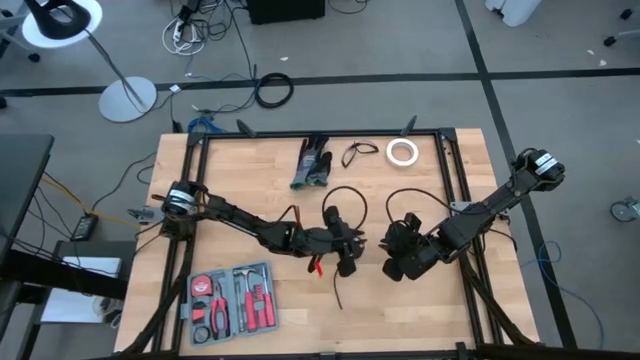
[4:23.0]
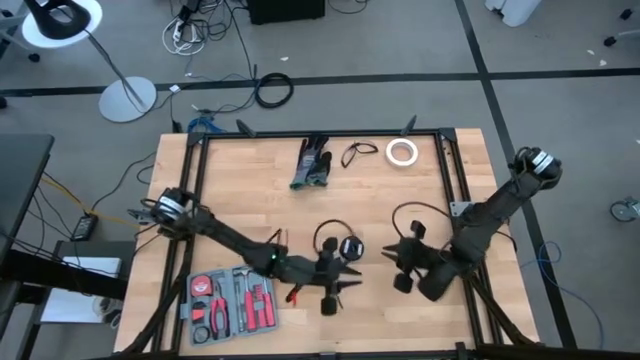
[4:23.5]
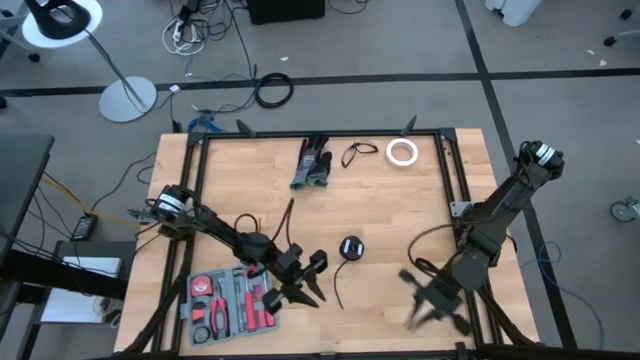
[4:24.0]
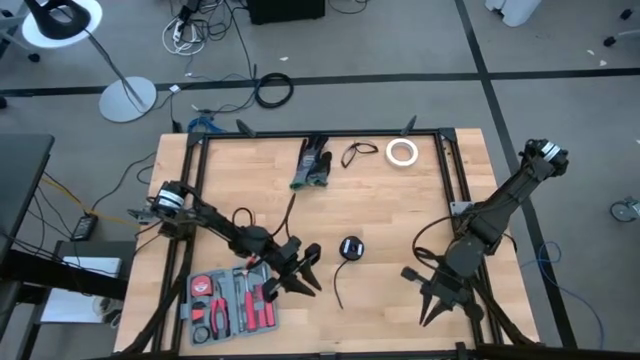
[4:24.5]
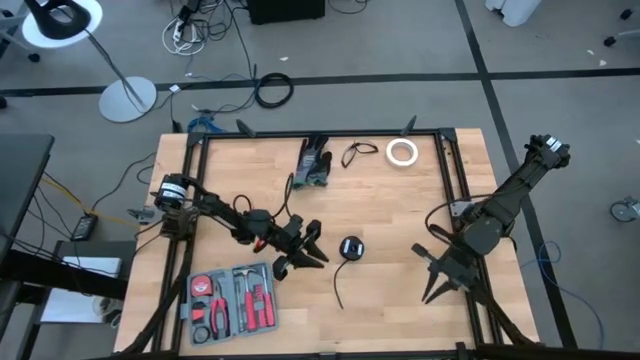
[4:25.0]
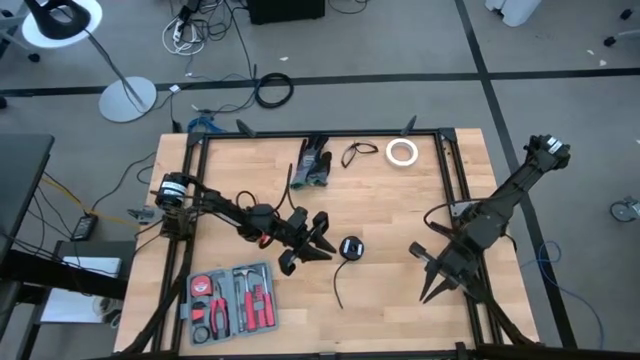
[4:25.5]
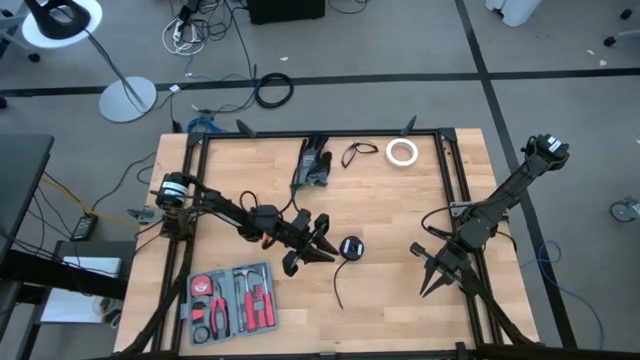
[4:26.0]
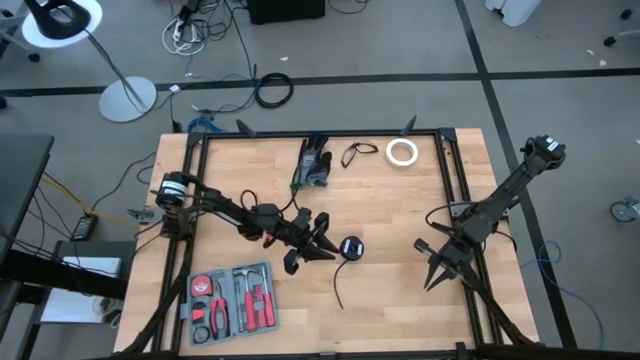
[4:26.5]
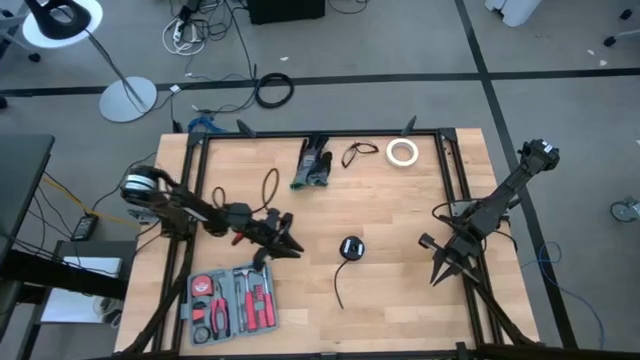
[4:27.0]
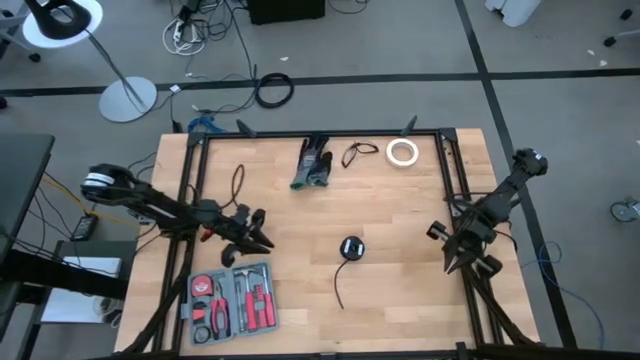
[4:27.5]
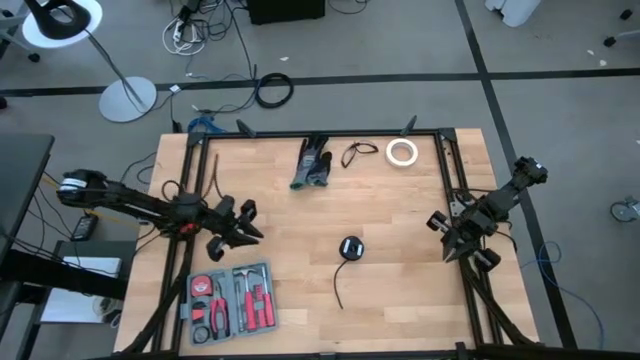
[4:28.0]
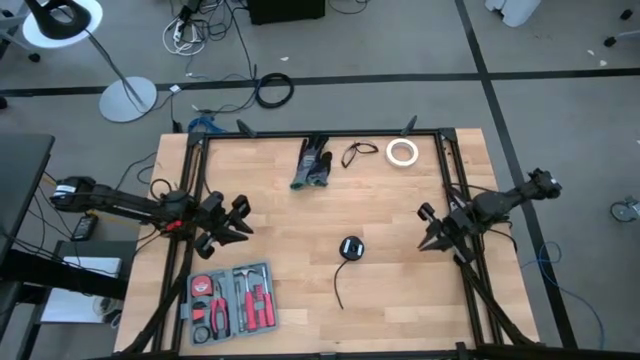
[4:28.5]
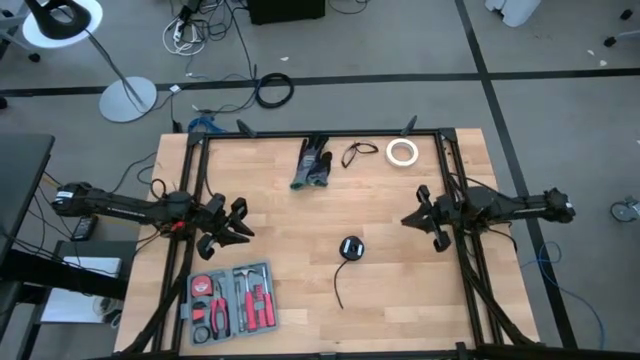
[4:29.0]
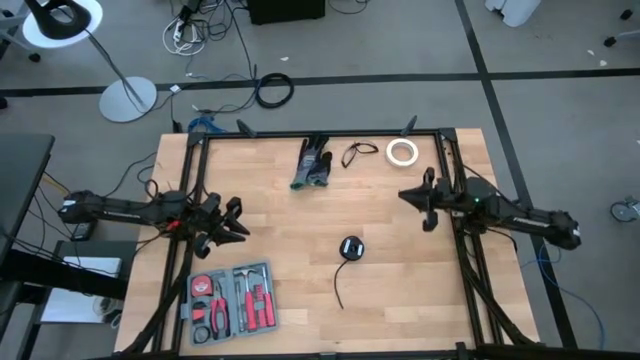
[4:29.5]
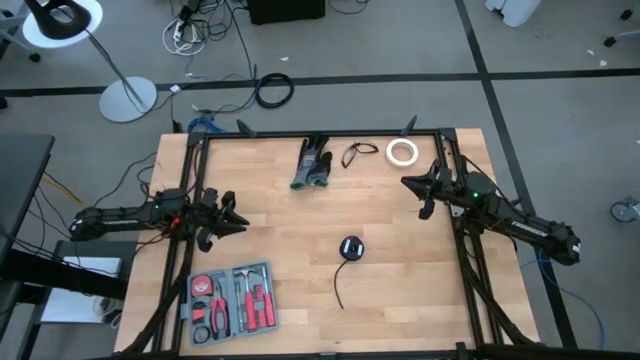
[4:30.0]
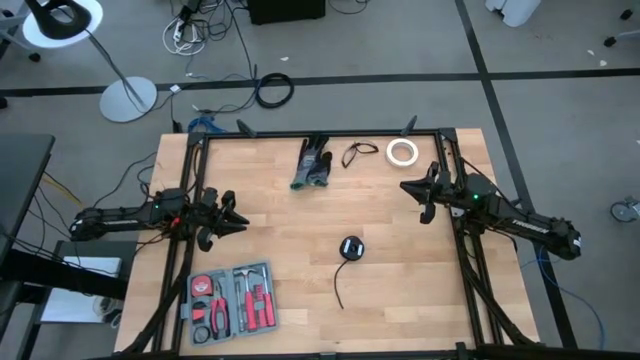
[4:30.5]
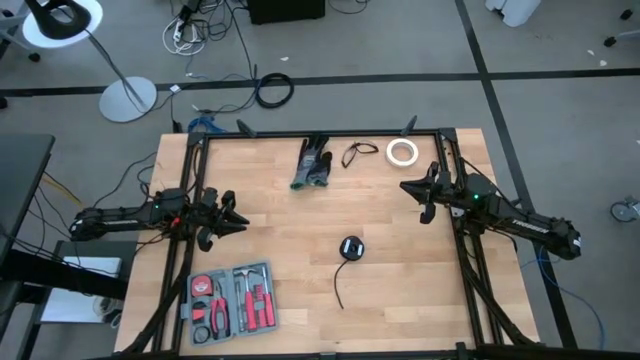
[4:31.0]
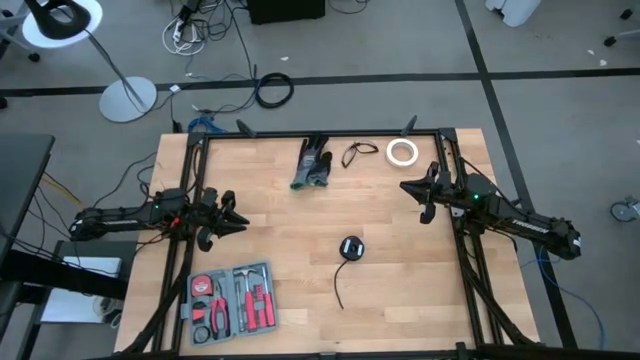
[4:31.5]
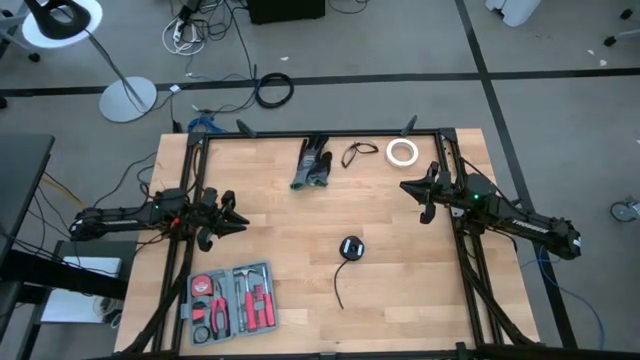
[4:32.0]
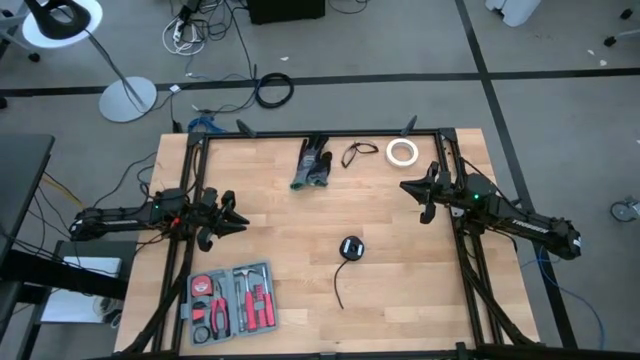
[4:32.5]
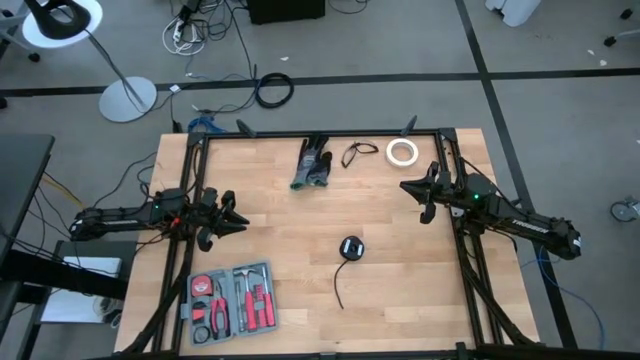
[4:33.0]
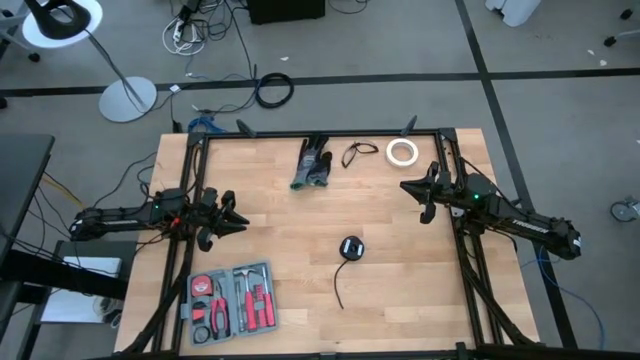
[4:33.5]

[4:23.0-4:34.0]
Task: Coil cords
Return to Home Position

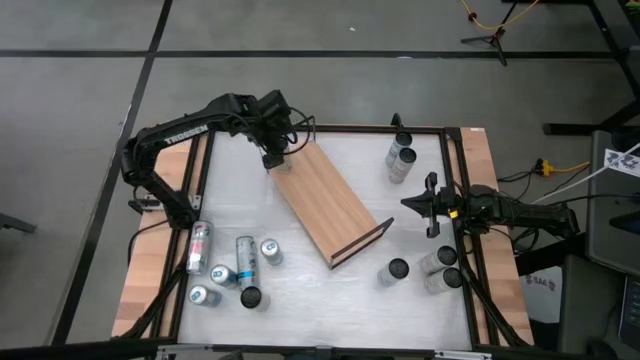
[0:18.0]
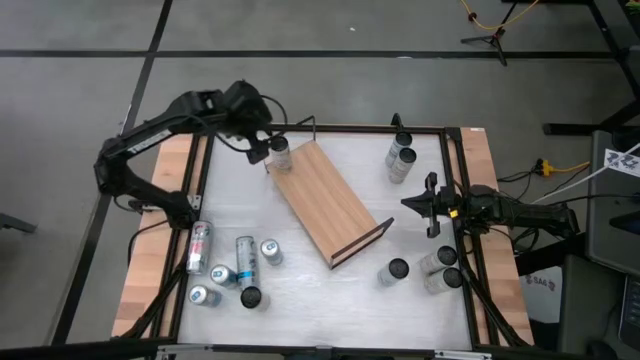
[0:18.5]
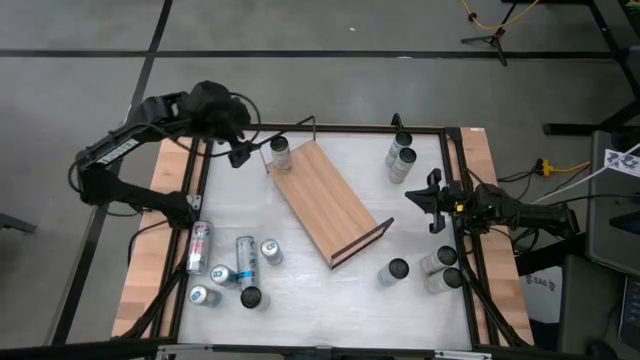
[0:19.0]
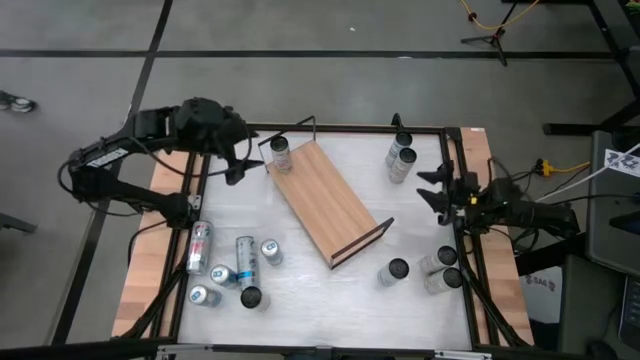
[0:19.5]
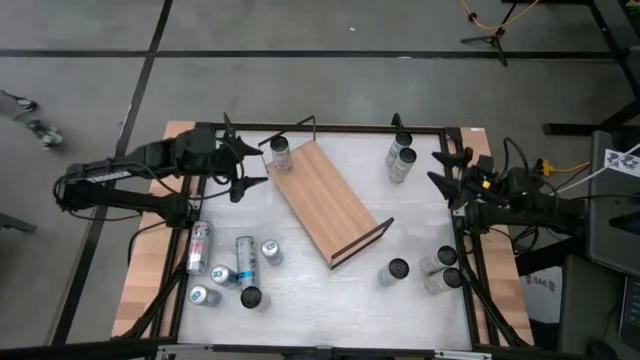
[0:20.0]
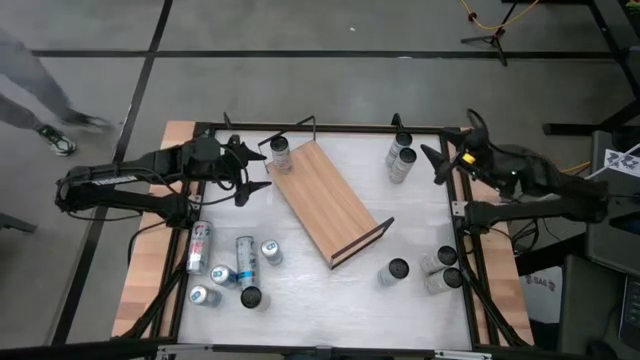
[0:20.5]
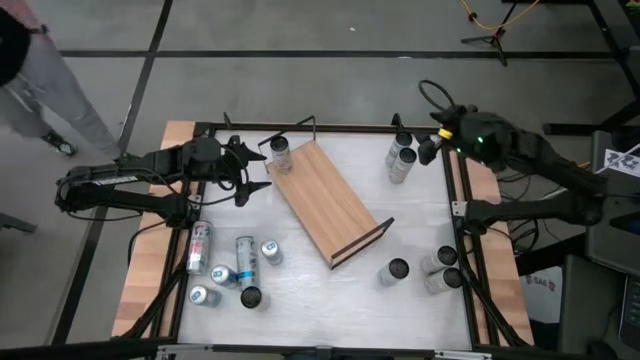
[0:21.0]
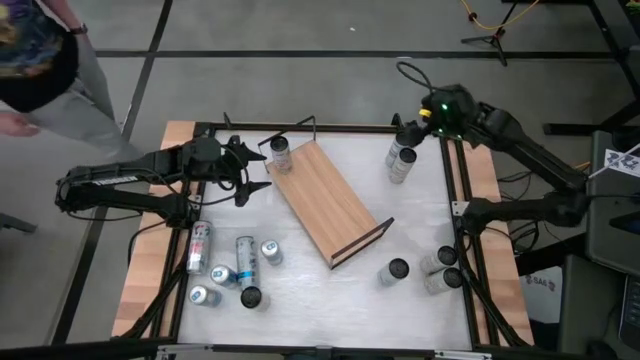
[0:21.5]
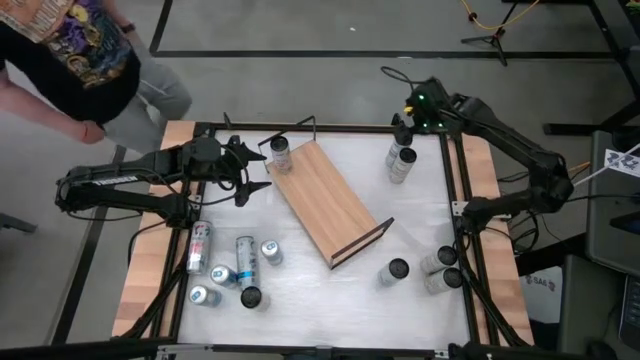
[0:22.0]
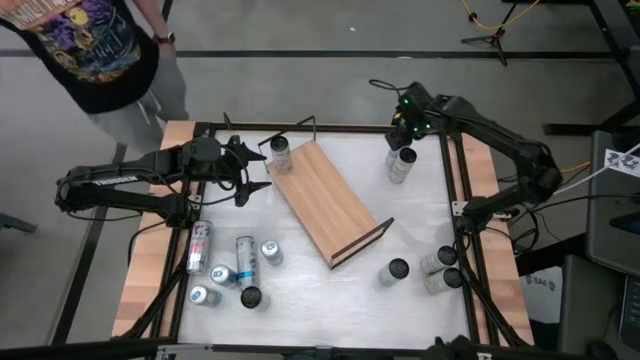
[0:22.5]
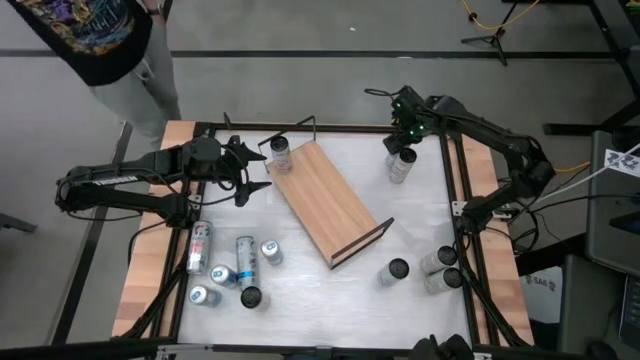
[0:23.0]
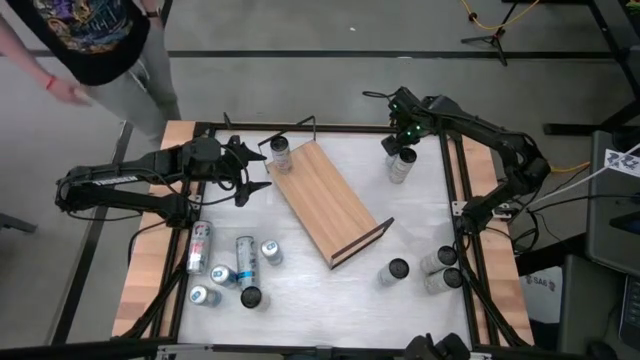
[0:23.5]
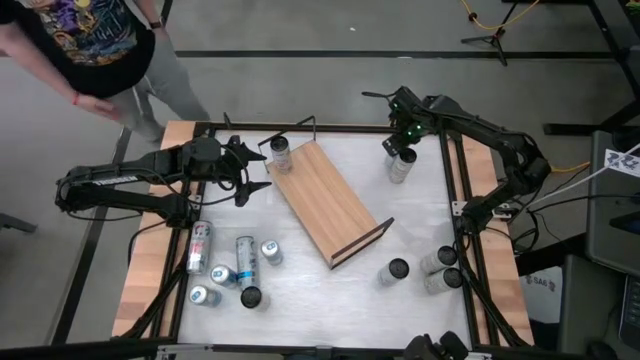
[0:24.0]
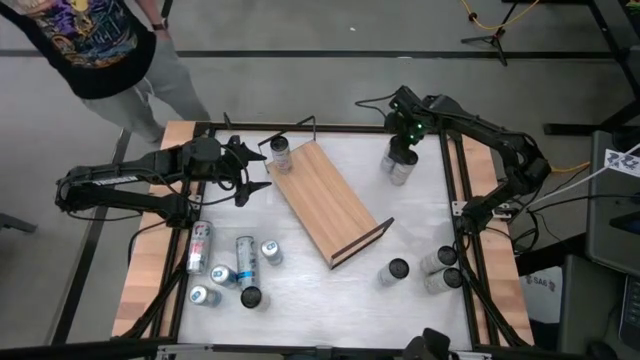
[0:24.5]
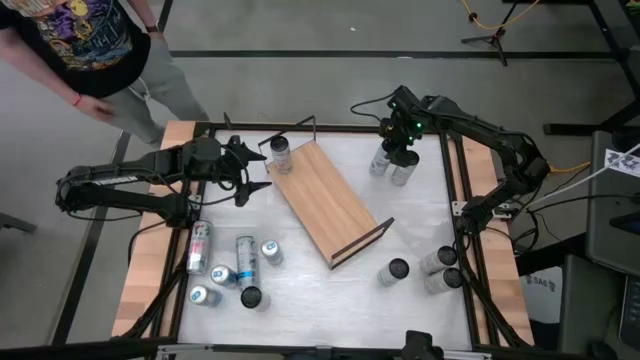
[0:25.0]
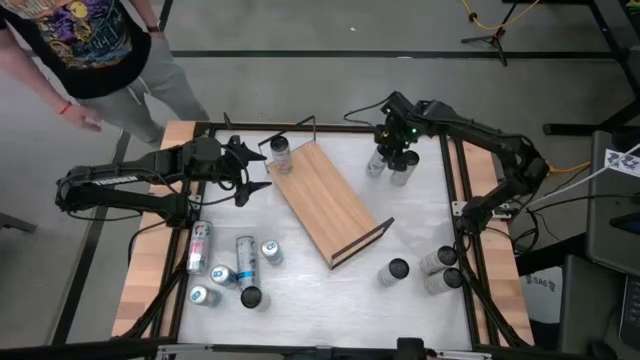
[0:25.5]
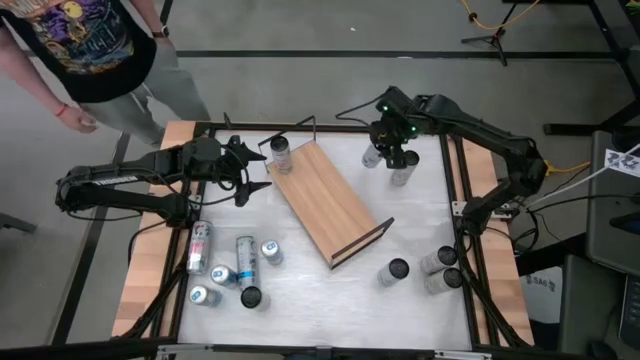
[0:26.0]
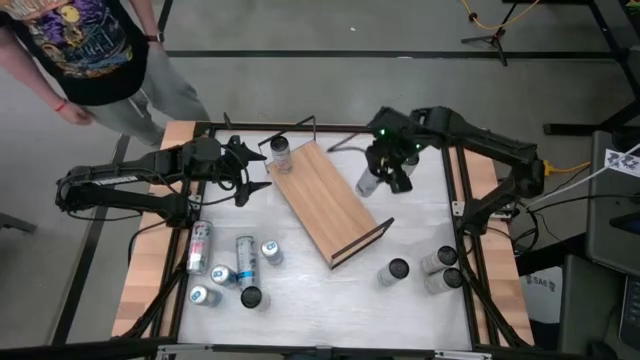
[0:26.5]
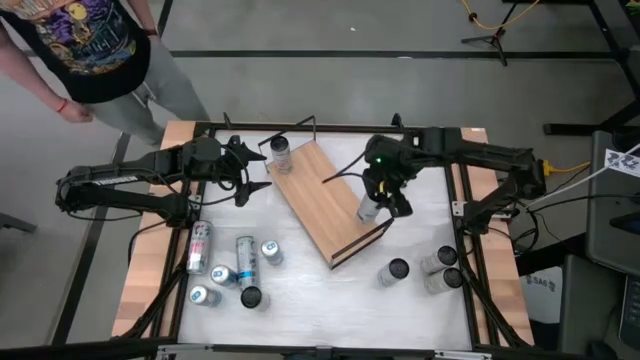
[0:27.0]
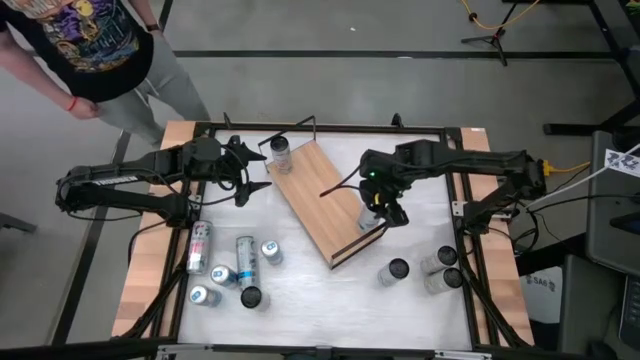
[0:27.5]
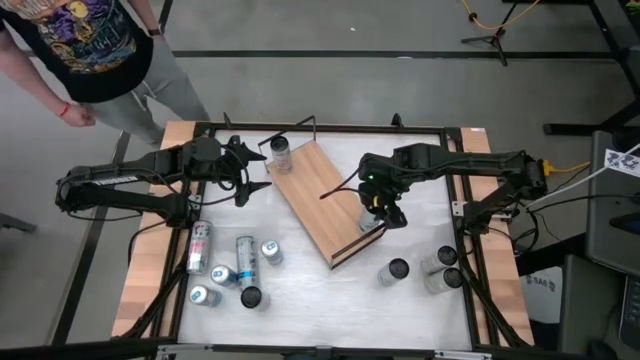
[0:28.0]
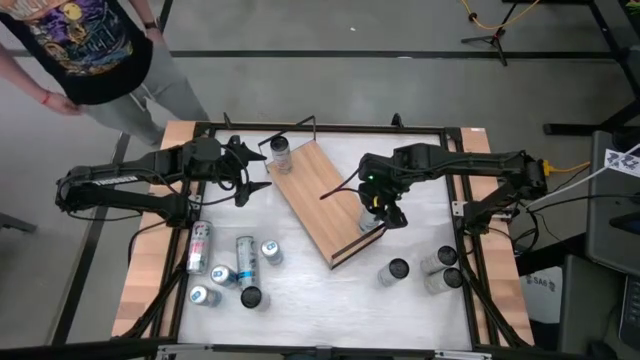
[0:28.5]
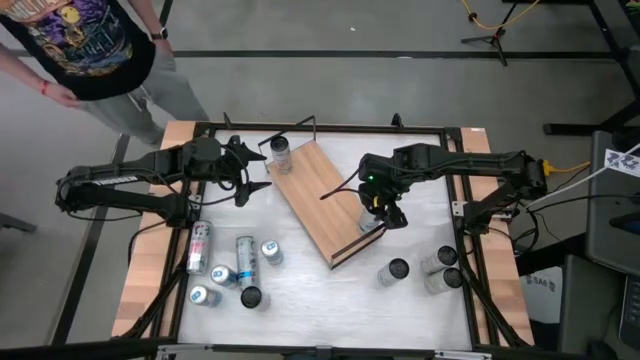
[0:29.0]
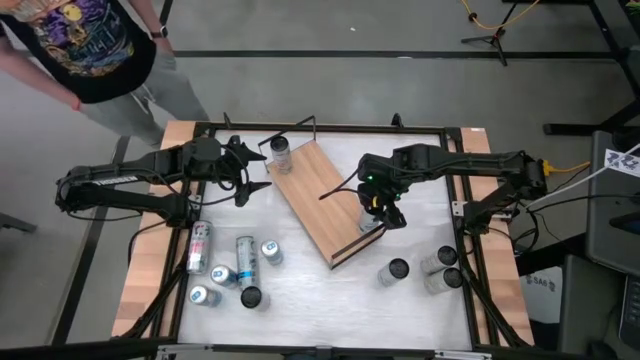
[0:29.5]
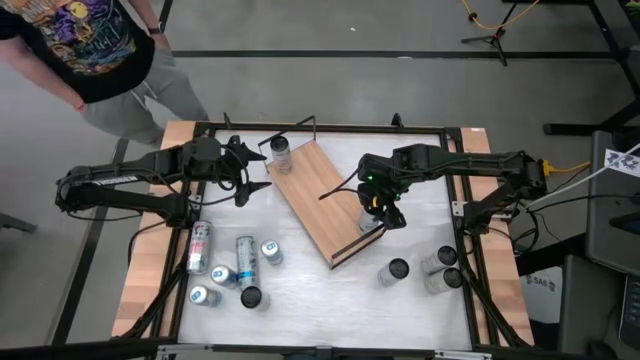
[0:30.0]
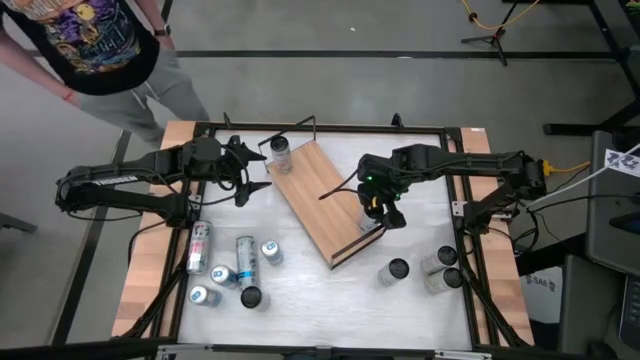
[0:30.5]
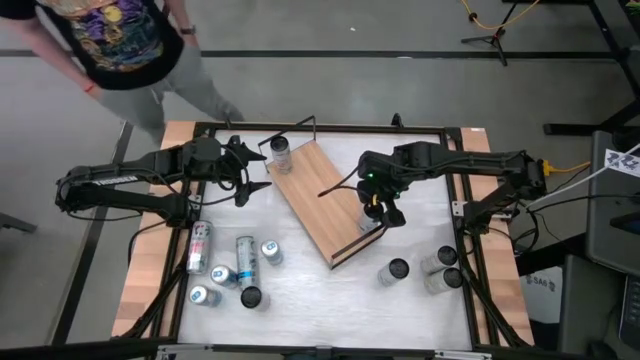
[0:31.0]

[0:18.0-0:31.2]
Task: Place canned beverage on shelf
Put the top white and blue soda can on the shelf
